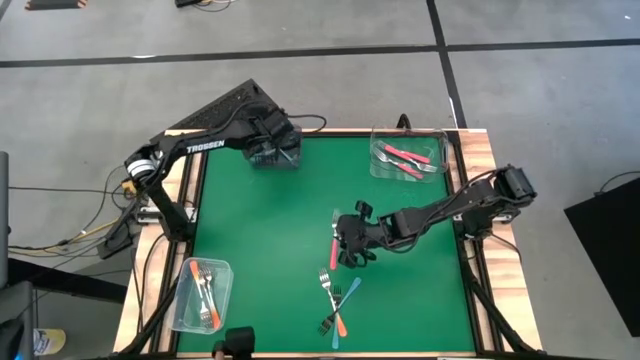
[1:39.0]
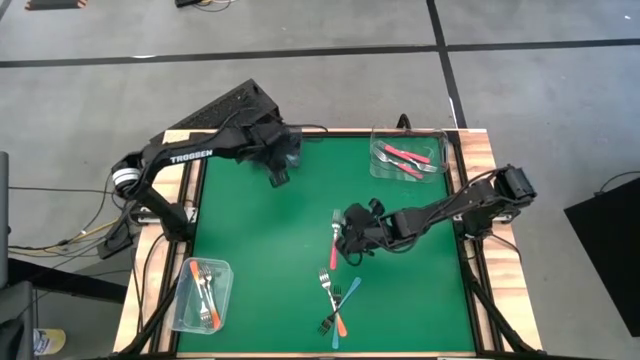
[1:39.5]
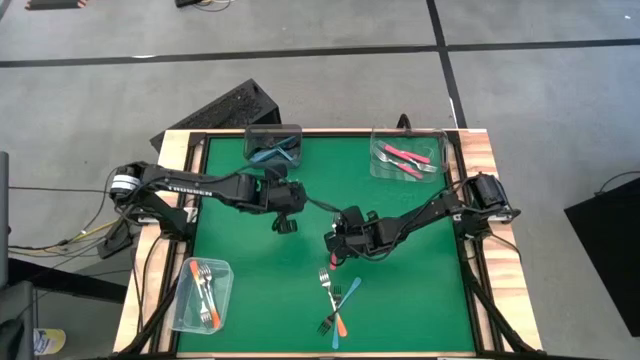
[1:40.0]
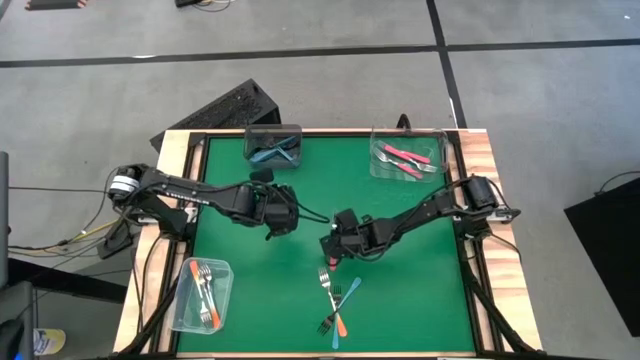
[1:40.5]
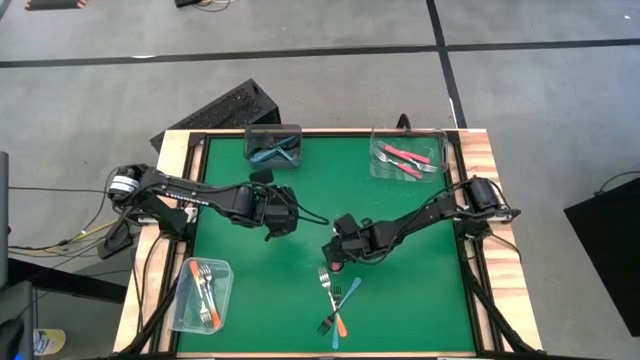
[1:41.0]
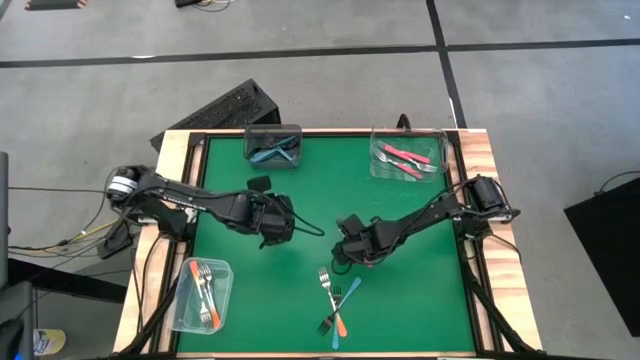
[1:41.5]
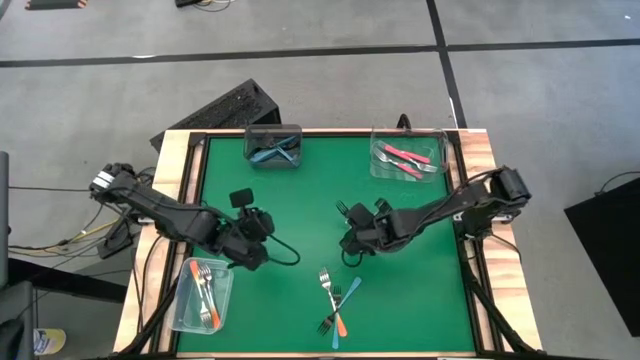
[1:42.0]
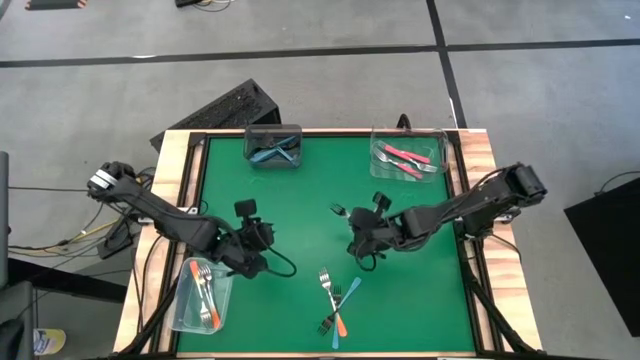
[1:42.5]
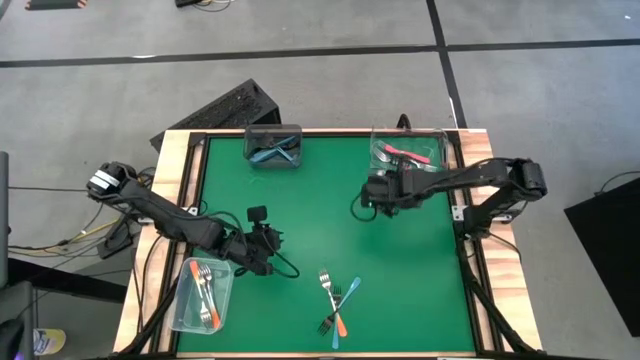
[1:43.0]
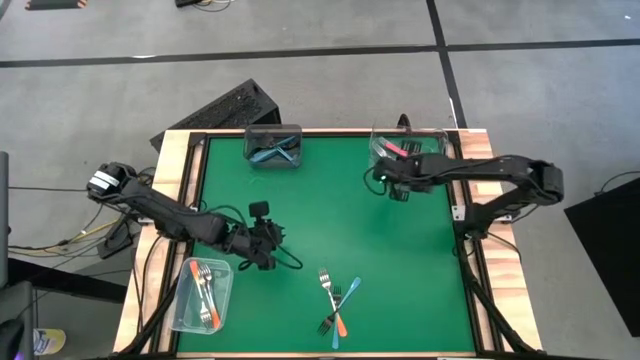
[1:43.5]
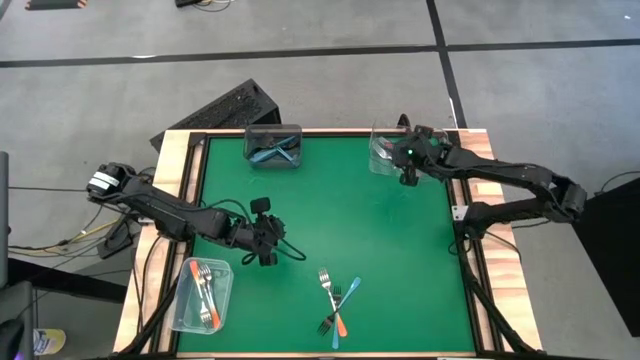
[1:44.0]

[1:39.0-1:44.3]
Task: Sort silverware by color (type)
Put the pink fork into the transparent bin

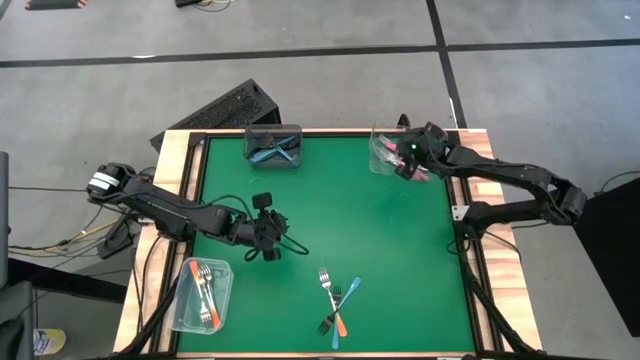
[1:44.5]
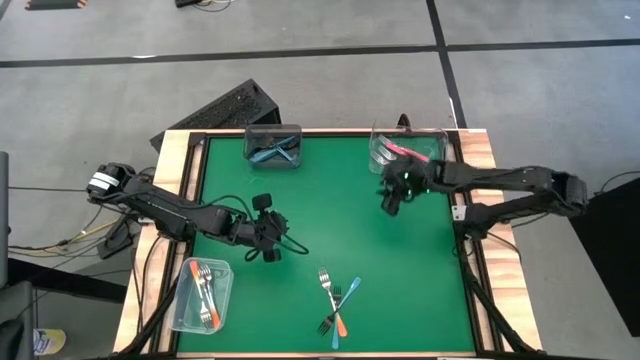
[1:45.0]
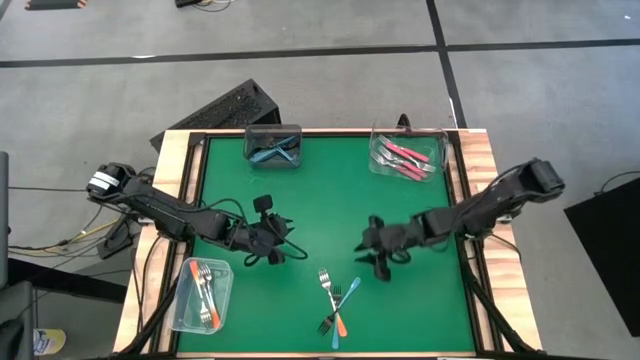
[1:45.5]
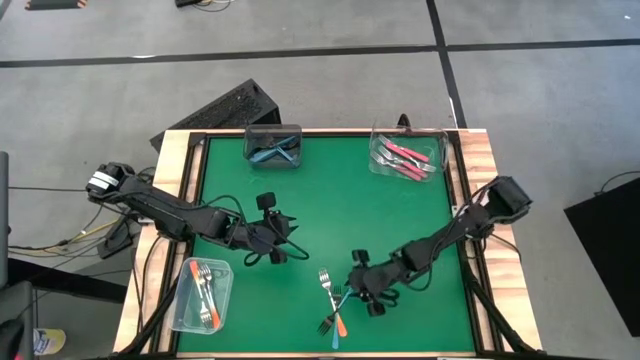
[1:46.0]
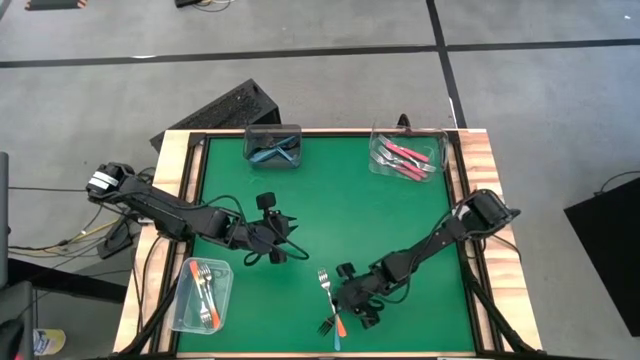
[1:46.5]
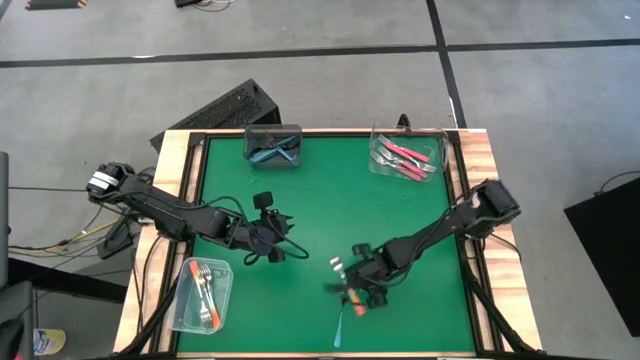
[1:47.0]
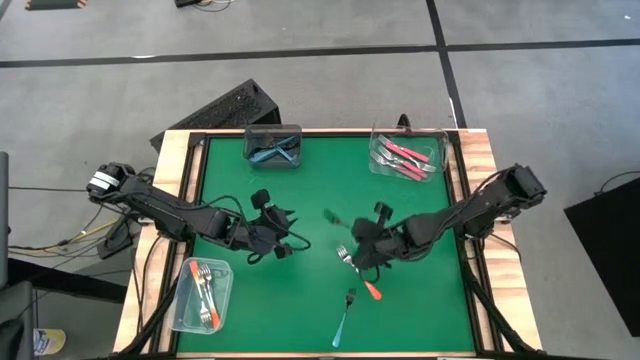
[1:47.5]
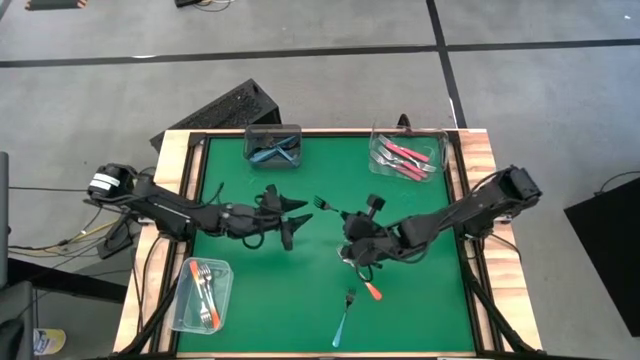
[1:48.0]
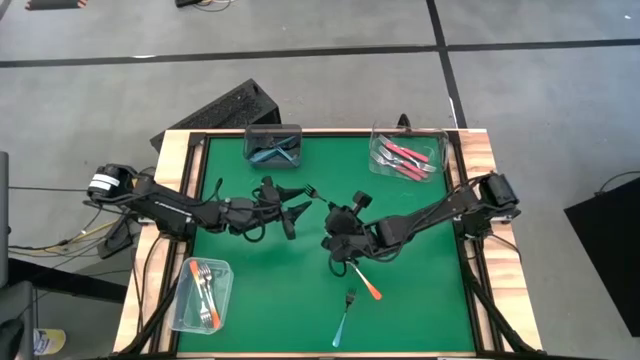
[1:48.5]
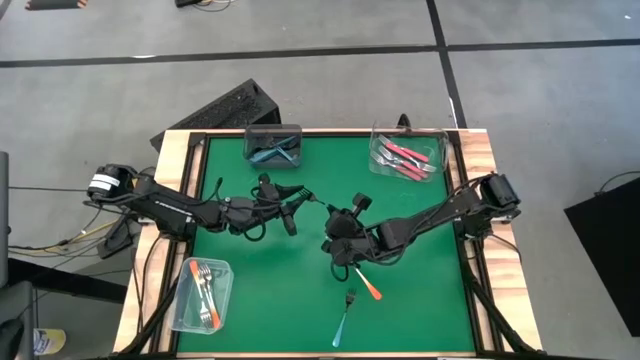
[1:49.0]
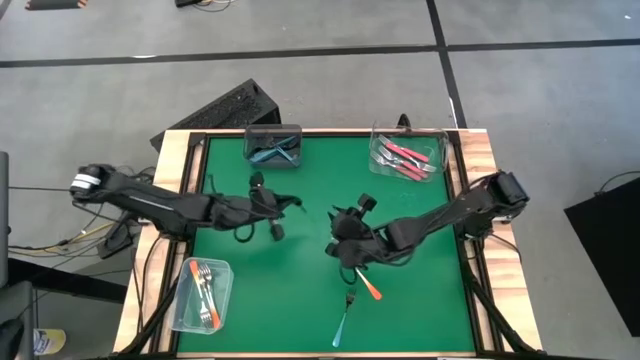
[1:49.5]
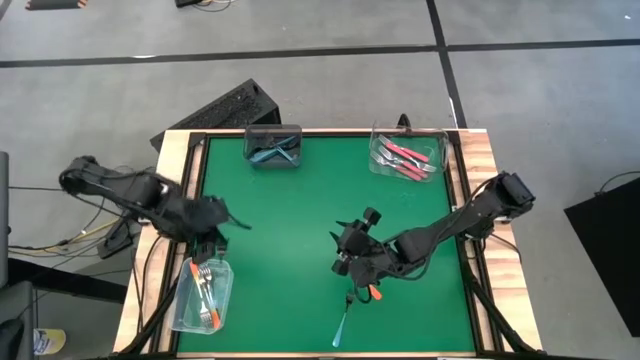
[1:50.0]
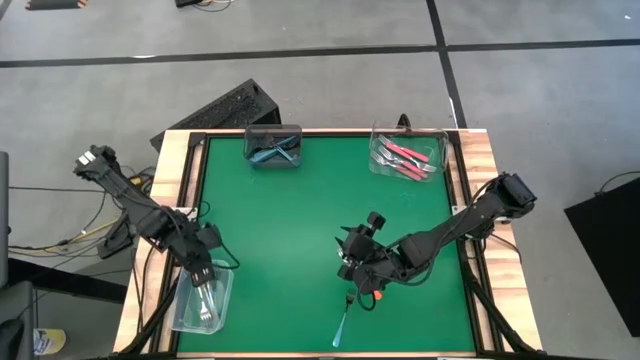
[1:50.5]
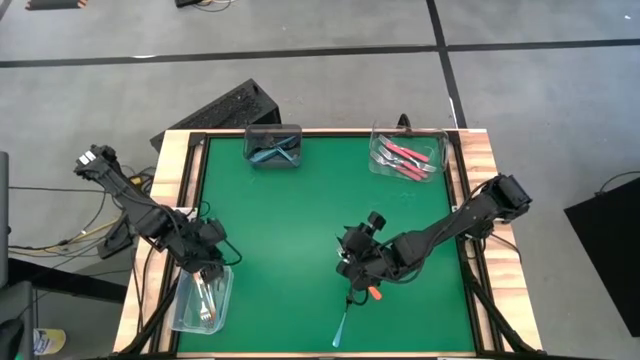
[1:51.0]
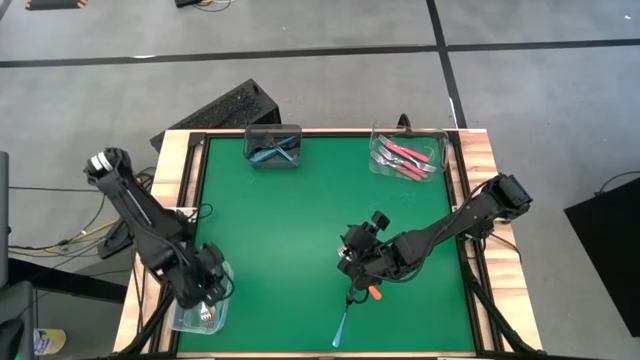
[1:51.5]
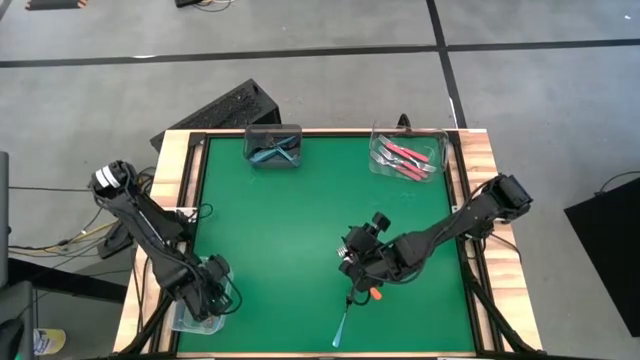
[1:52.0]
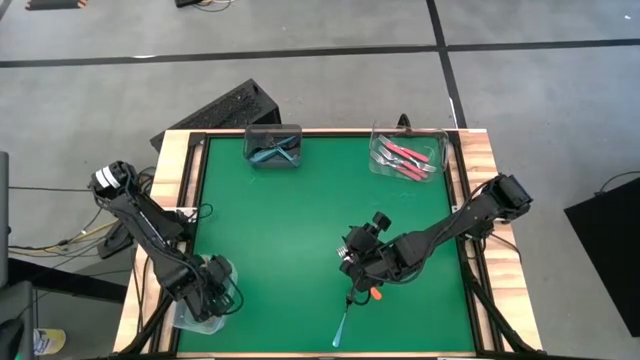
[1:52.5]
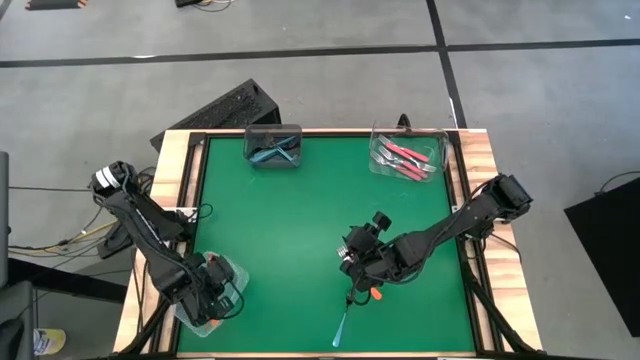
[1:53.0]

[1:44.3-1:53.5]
Put the blue fork into the black bin

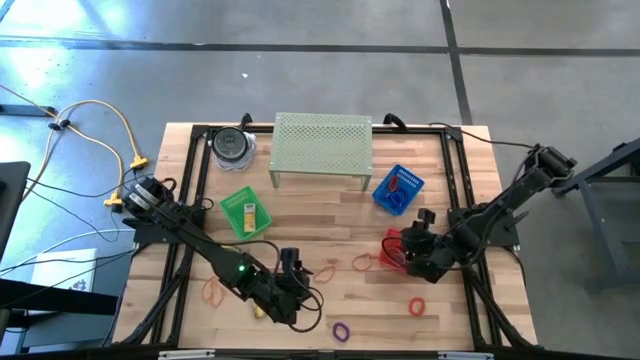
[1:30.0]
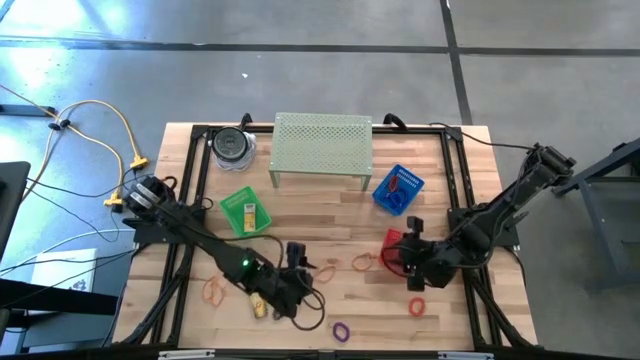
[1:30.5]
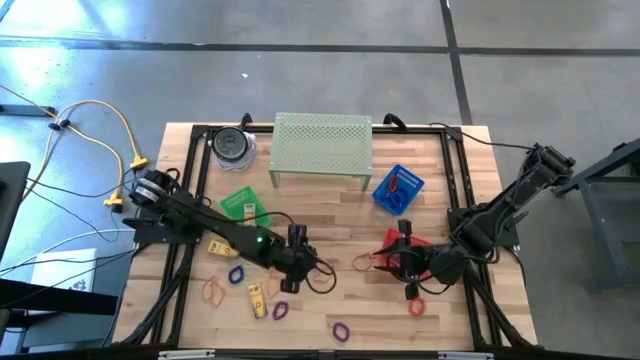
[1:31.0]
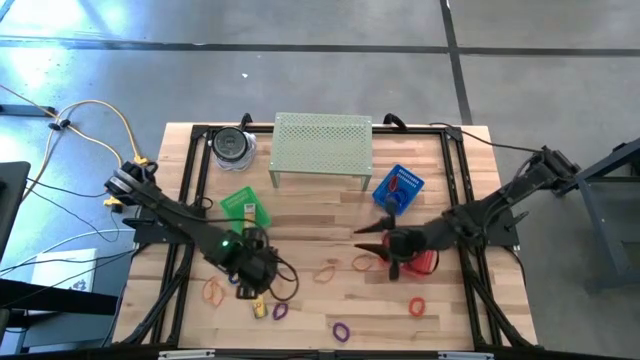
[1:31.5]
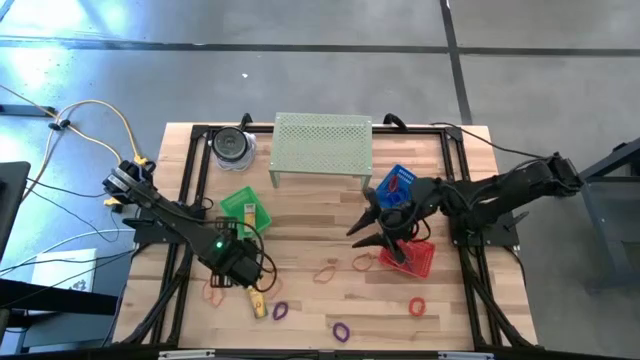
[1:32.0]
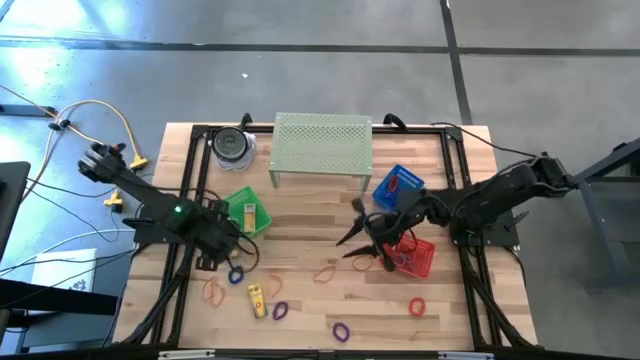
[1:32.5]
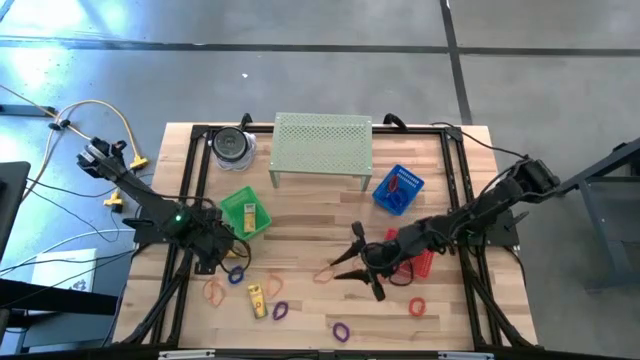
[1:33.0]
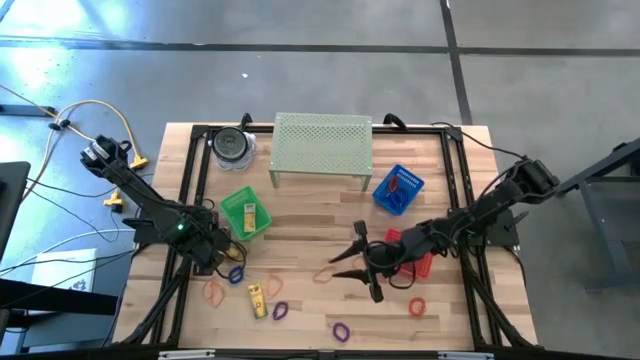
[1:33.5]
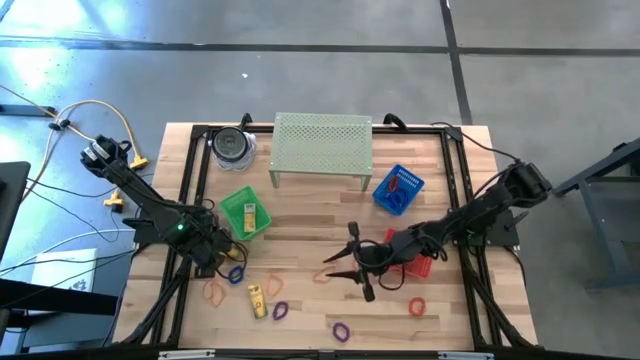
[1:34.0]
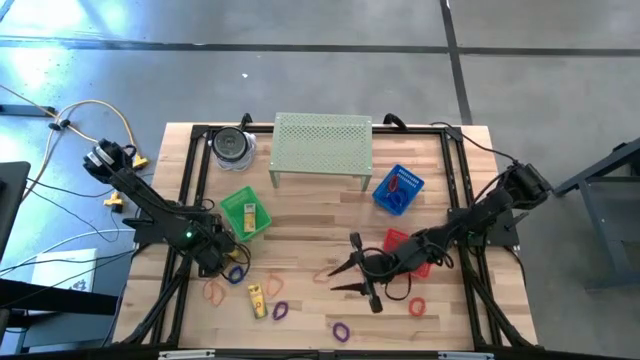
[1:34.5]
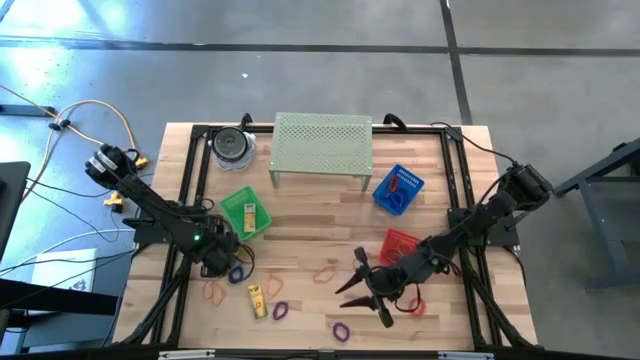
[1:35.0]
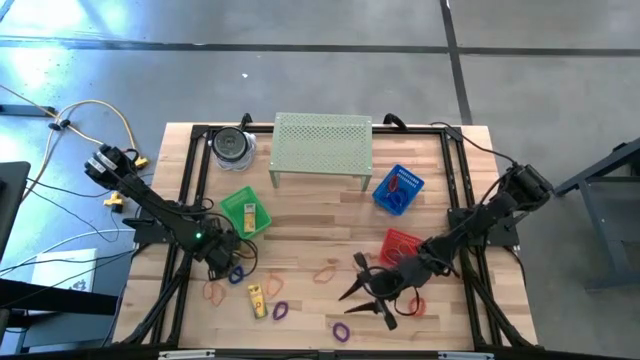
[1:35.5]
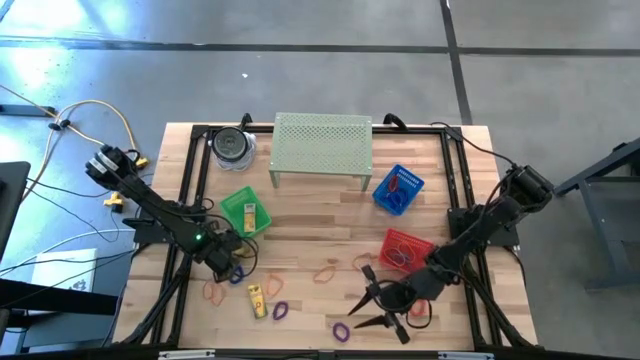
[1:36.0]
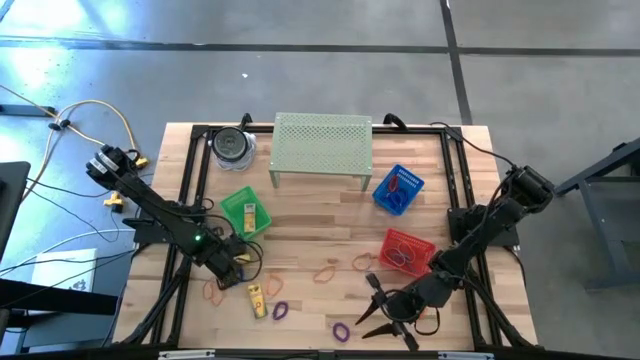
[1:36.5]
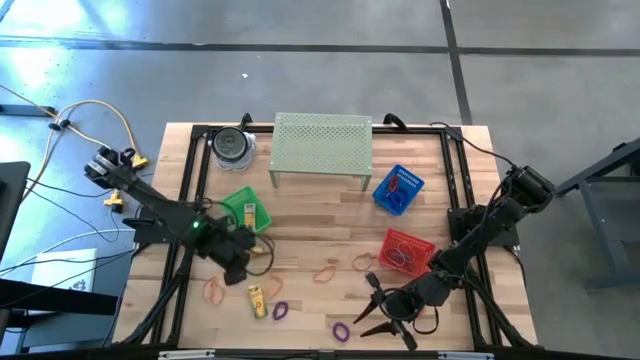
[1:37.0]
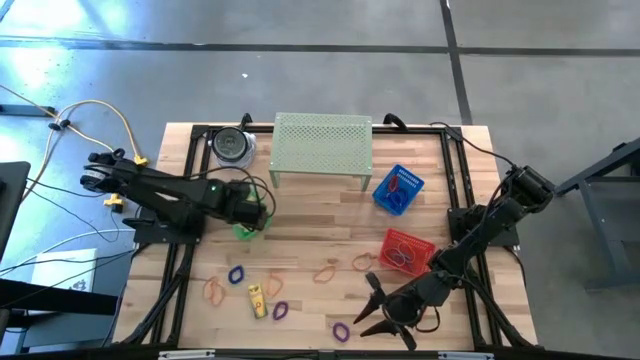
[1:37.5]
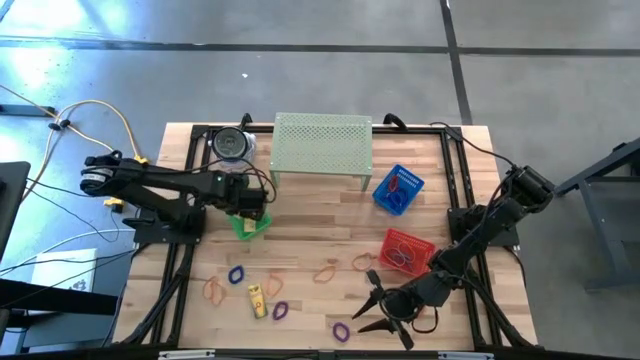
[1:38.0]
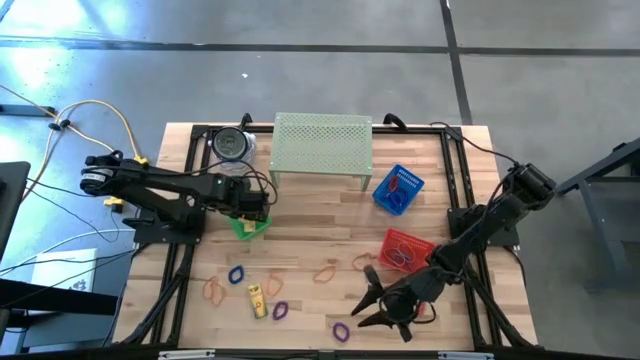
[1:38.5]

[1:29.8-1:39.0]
Task: Pick & Place Office Desk Supplies
Put the box of crayon into the green basket
